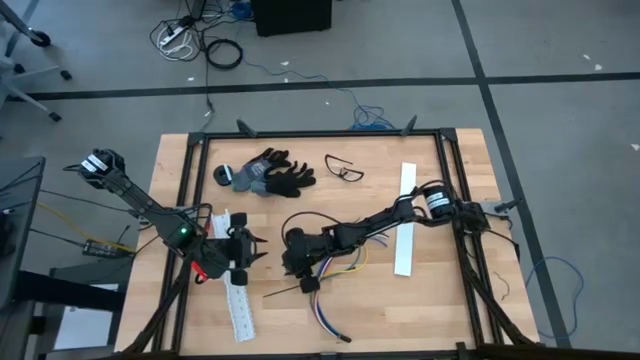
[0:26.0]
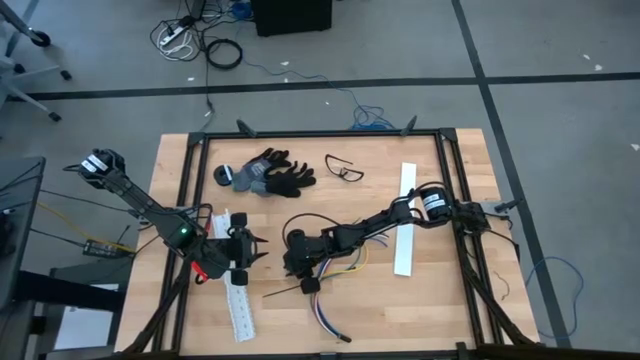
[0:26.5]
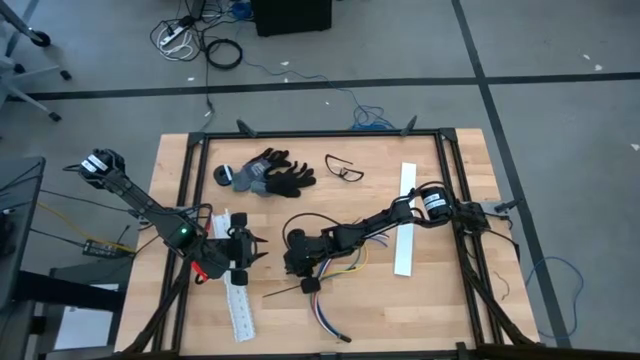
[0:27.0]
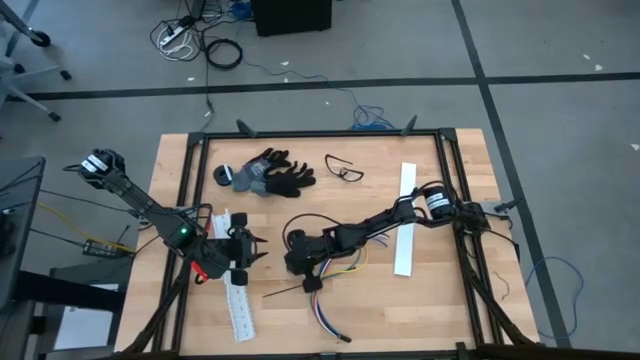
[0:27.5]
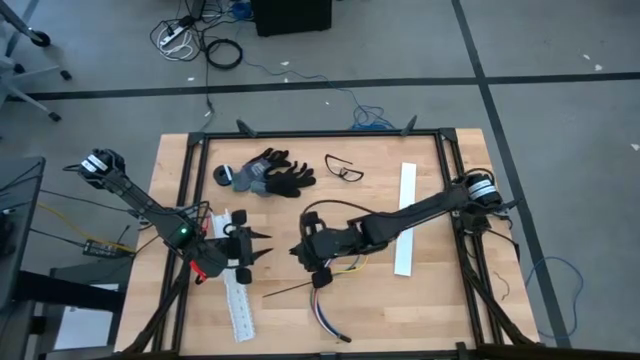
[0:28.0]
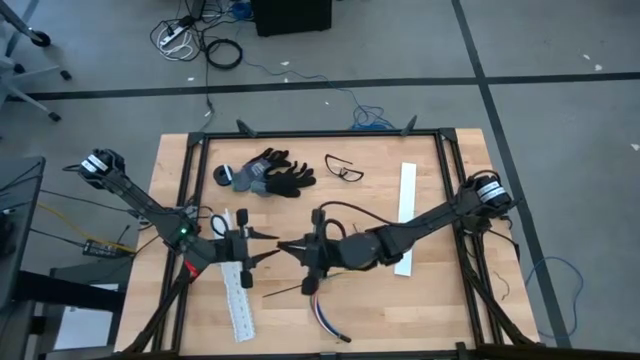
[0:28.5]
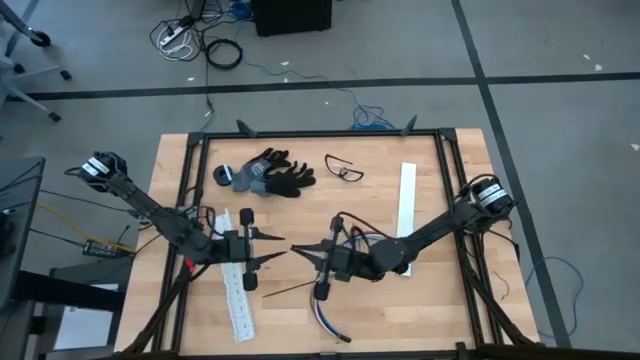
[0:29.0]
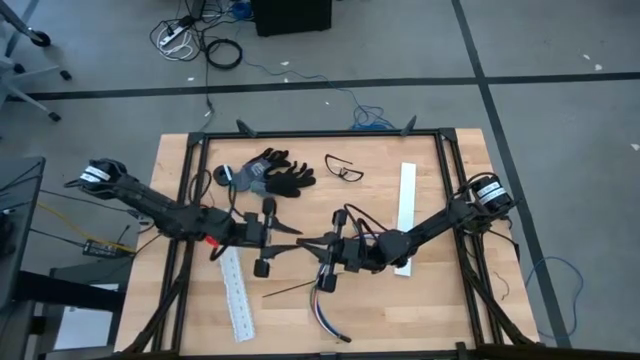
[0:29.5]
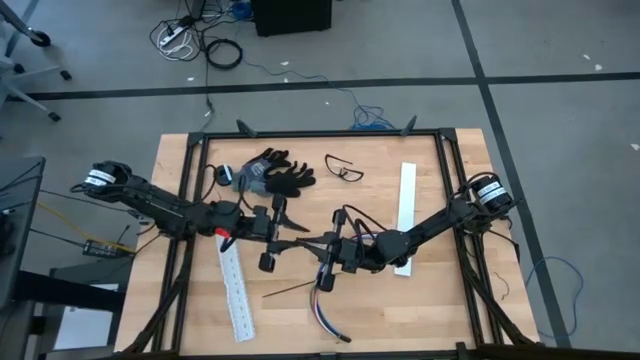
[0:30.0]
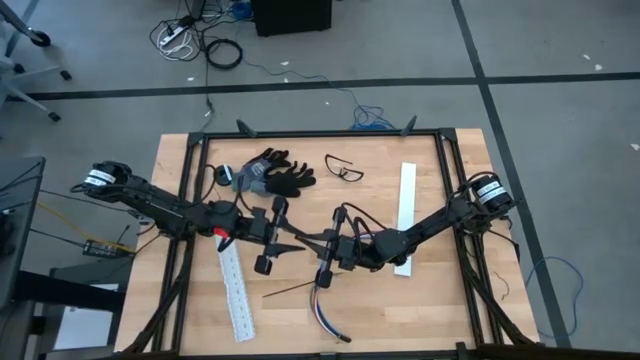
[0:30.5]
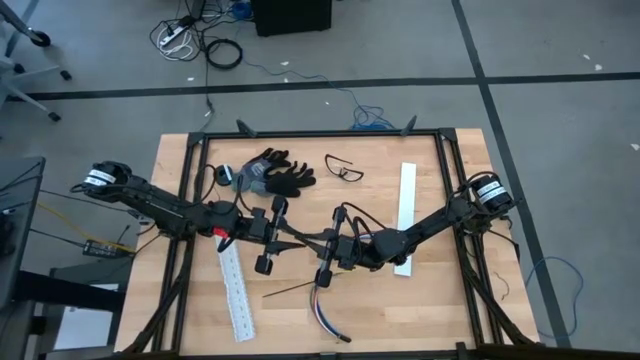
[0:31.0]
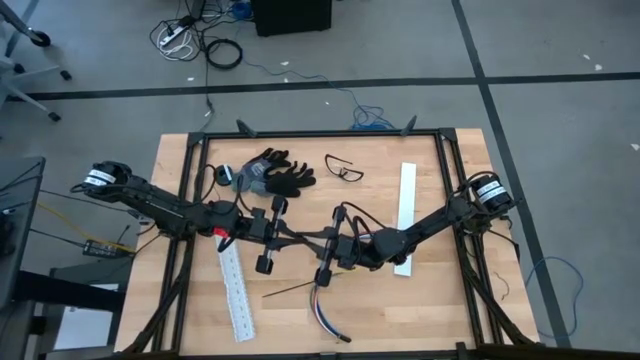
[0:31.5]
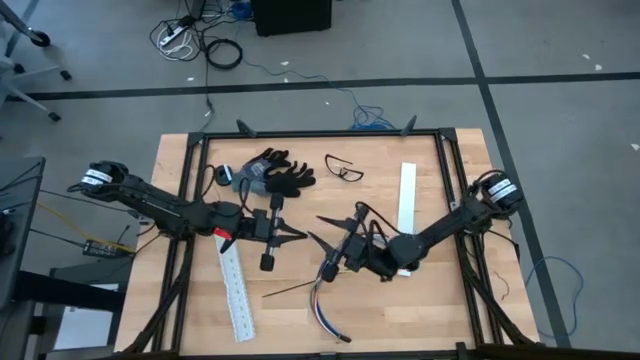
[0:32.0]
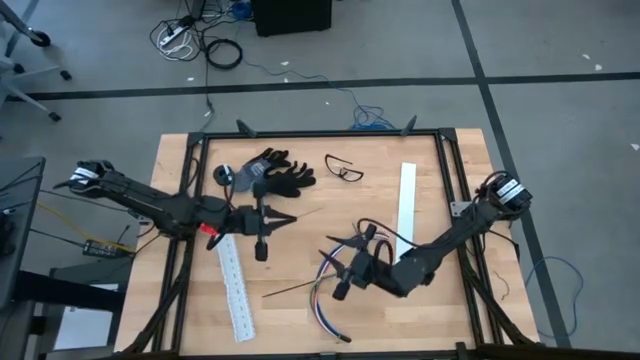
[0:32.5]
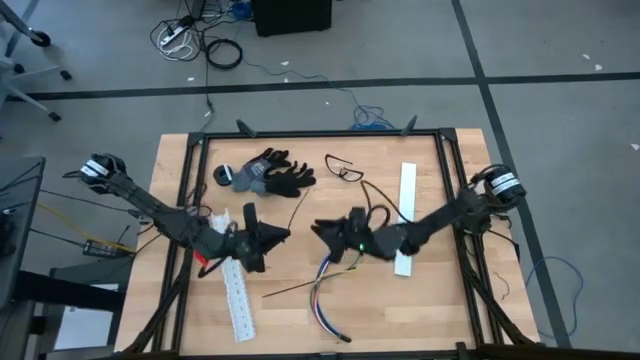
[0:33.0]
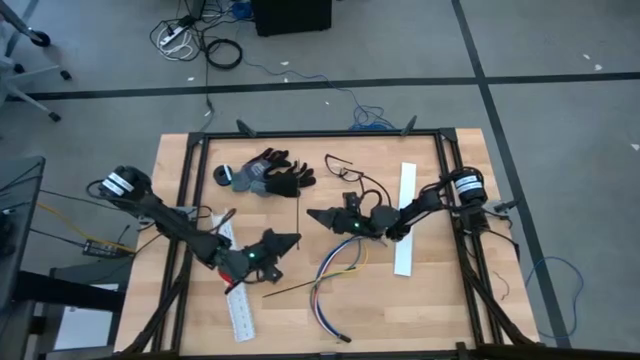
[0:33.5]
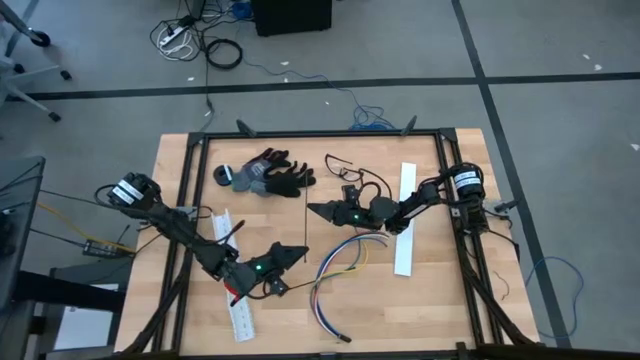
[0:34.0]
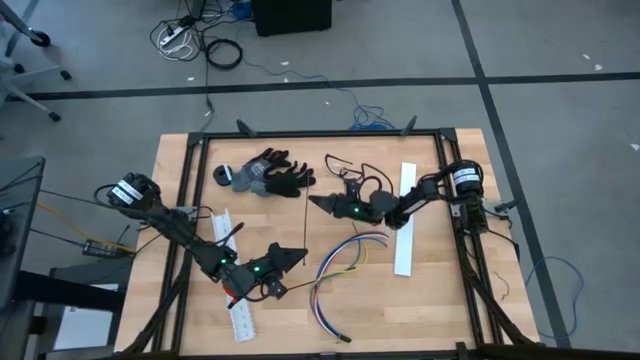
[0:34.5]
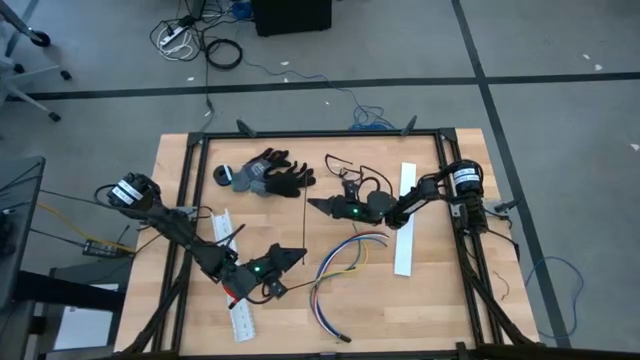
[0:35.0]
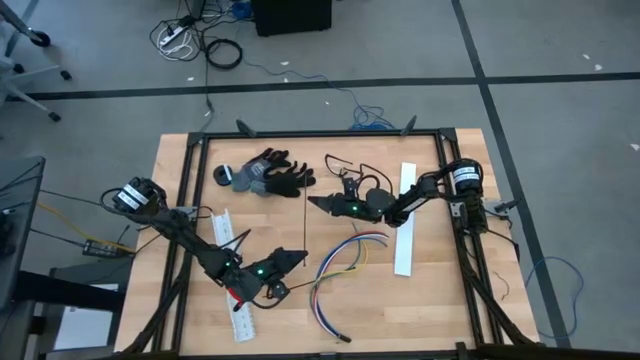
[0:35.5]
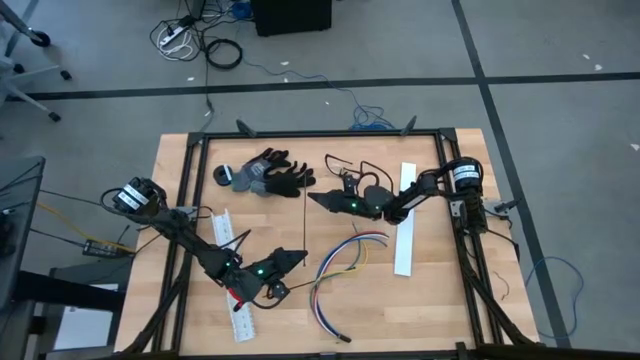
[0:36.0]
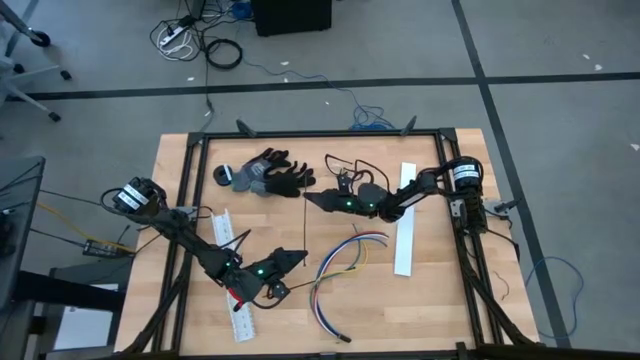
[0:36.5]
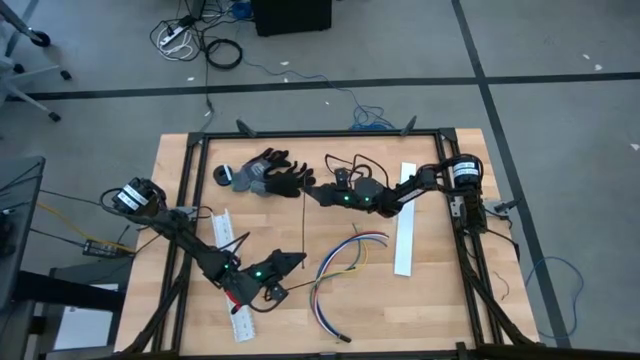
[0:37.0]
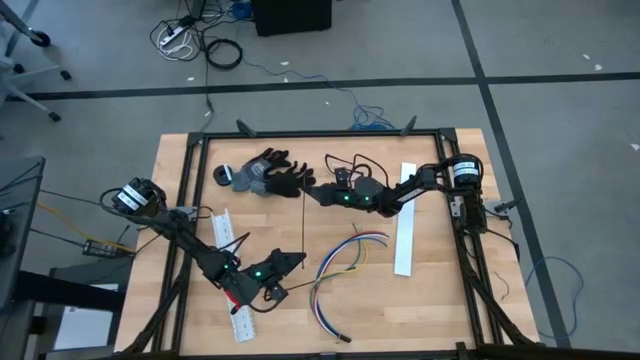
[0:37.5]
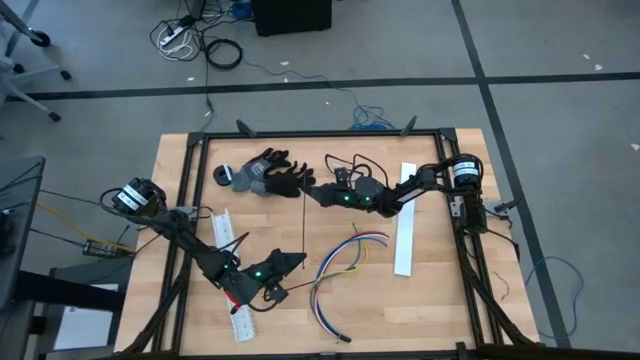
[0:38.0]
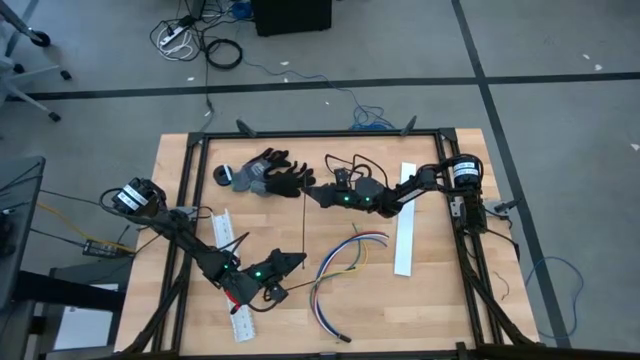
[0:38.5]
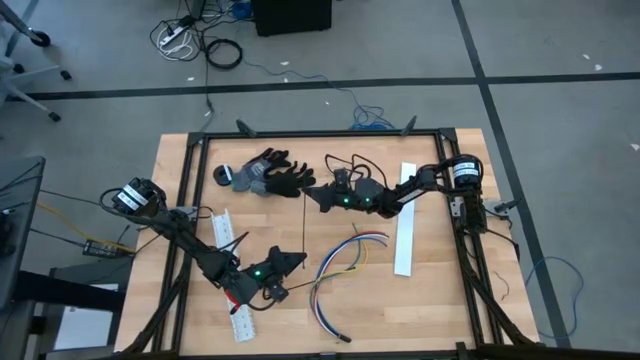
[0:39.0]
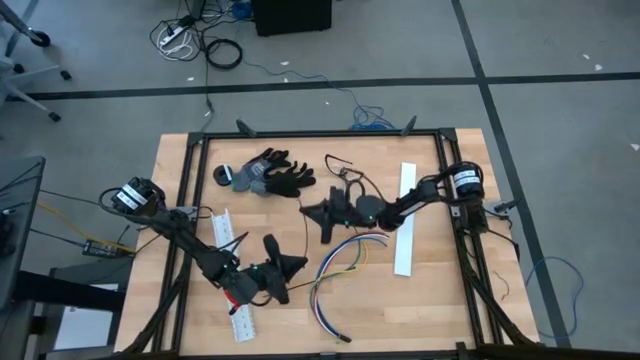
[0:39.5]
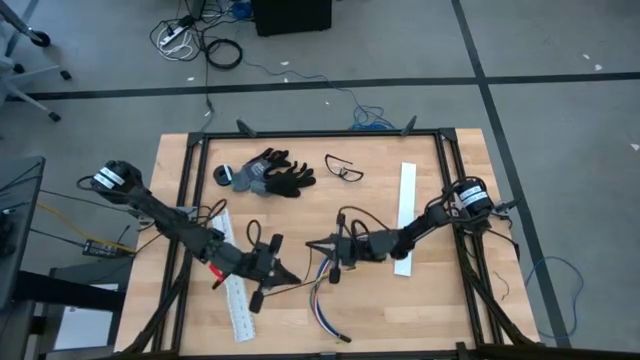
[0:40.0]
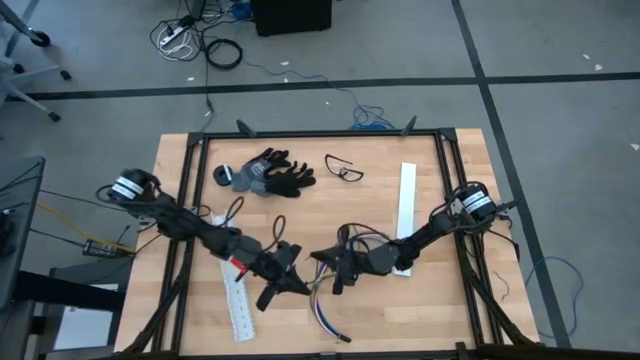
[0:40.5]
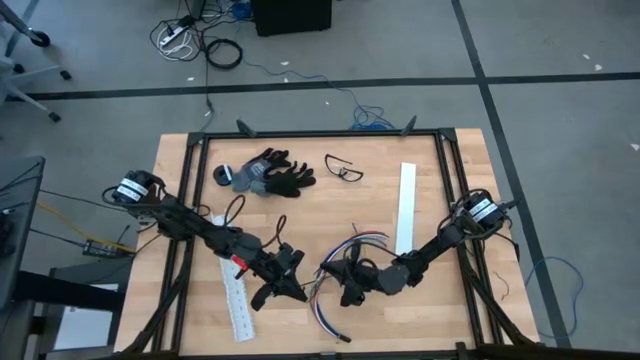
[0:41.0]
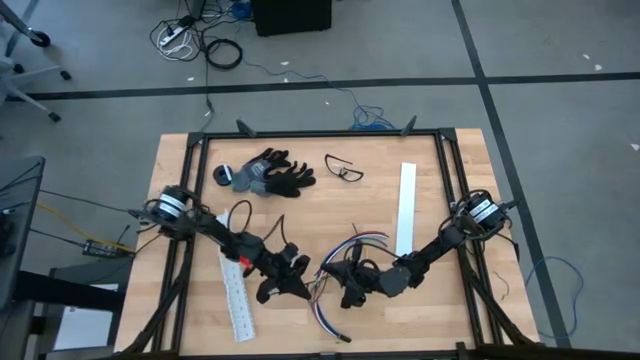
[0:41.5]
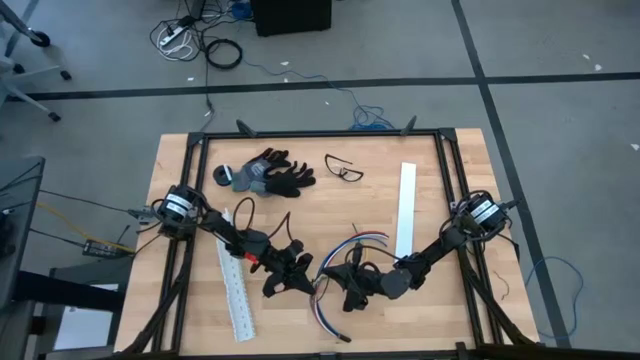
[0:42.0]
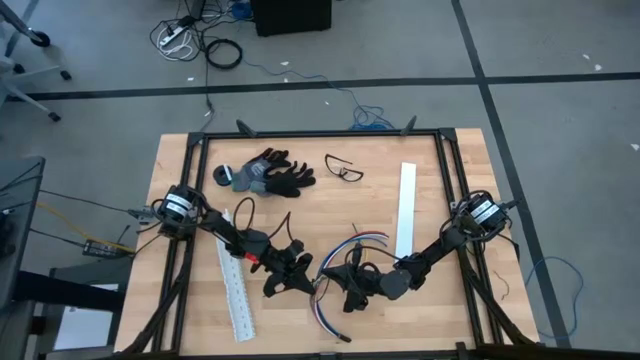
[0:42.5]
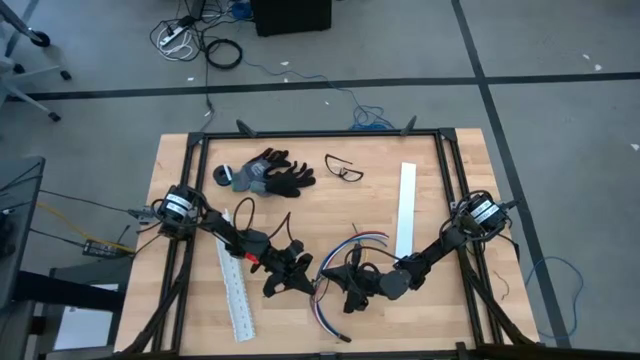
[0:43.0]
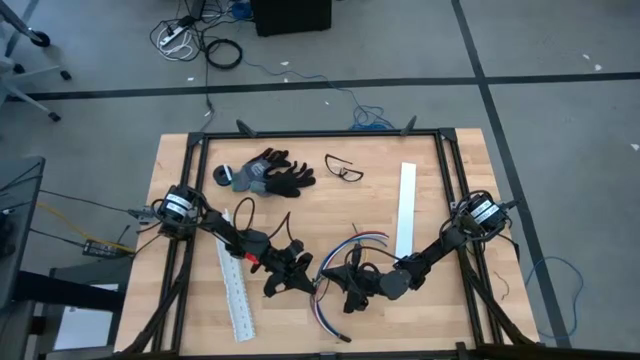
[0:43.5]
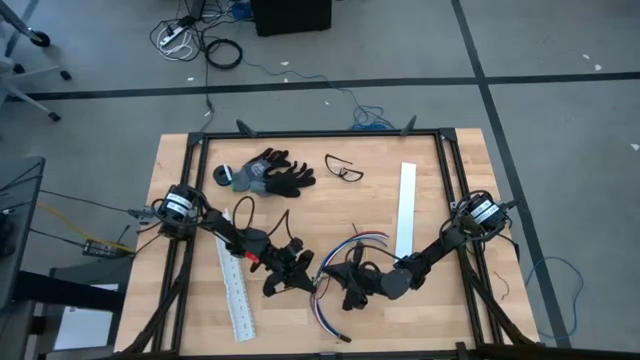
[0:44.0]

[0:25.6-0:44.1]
Task: Ziptie cables
Insert the top black zip tie pointed tail end through the slot to form a loop
